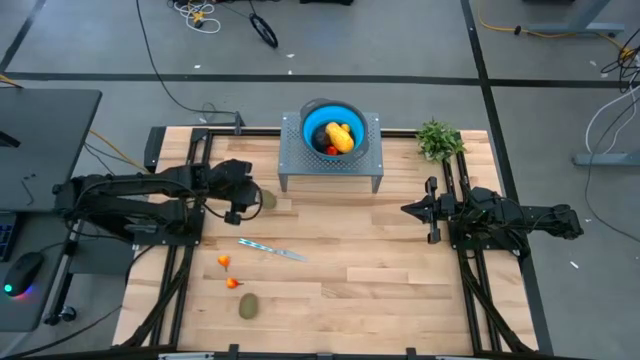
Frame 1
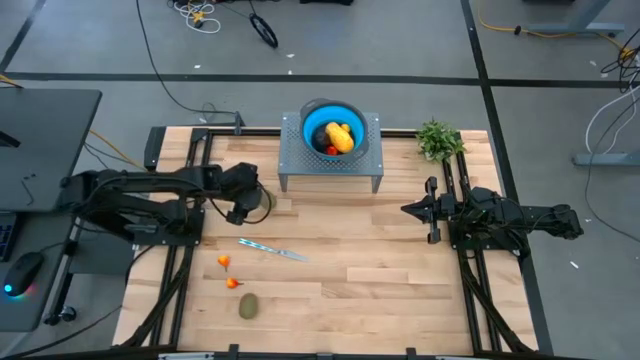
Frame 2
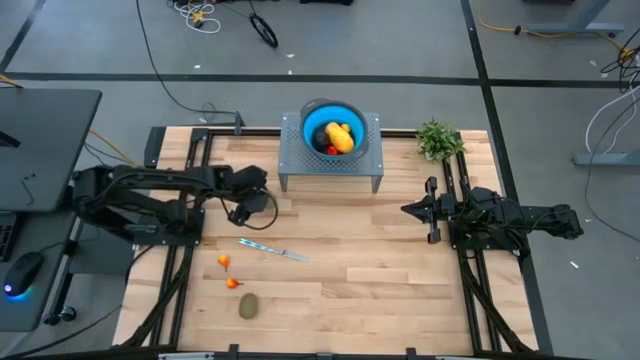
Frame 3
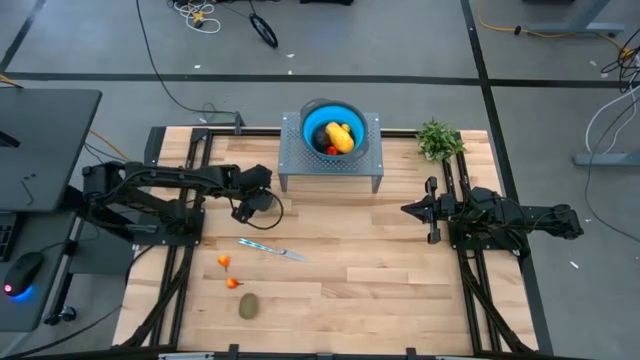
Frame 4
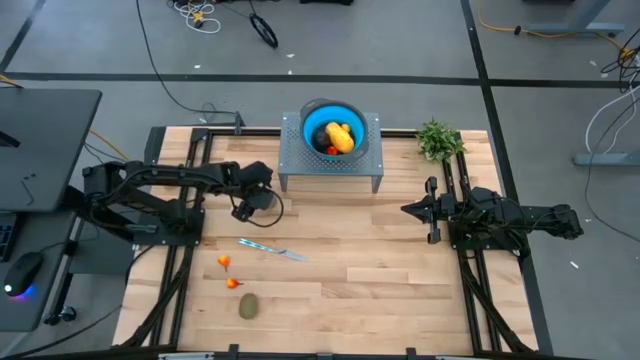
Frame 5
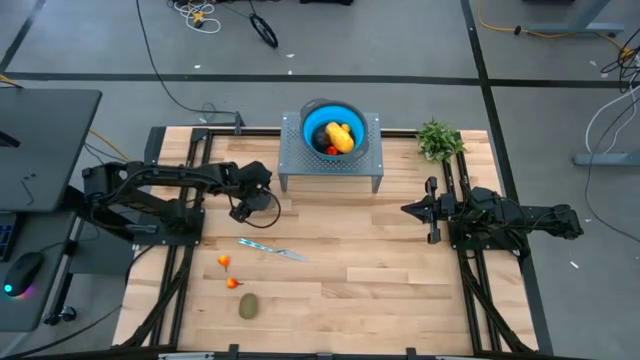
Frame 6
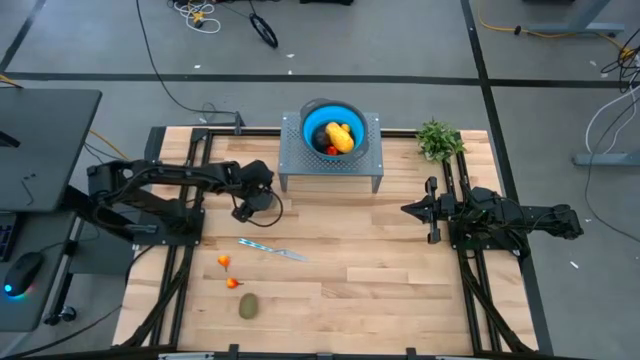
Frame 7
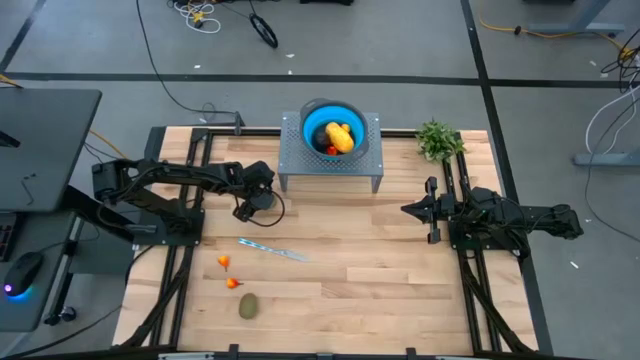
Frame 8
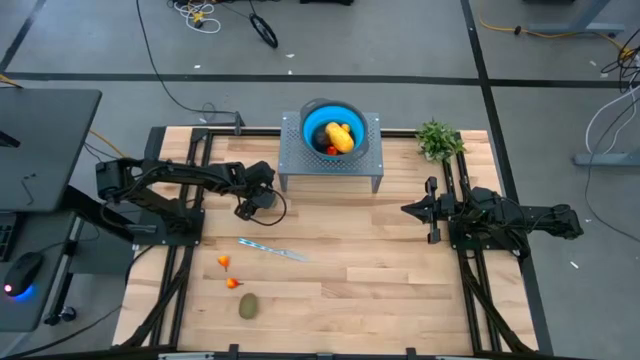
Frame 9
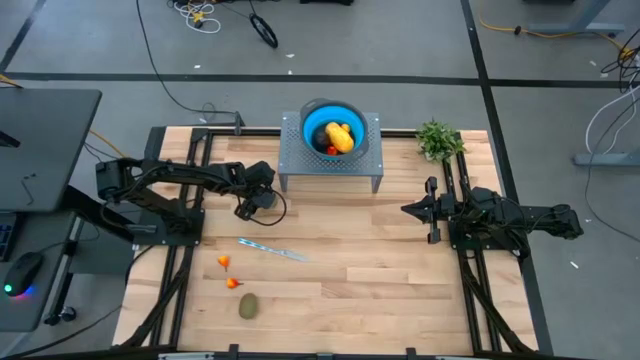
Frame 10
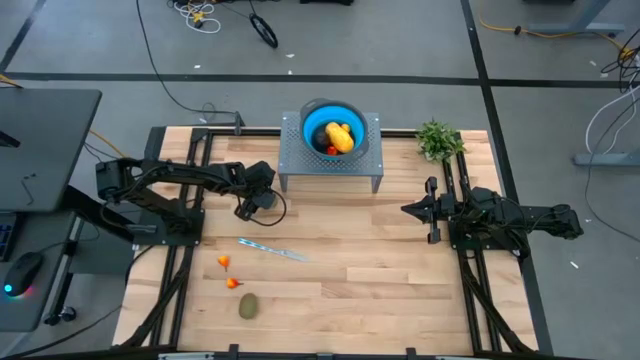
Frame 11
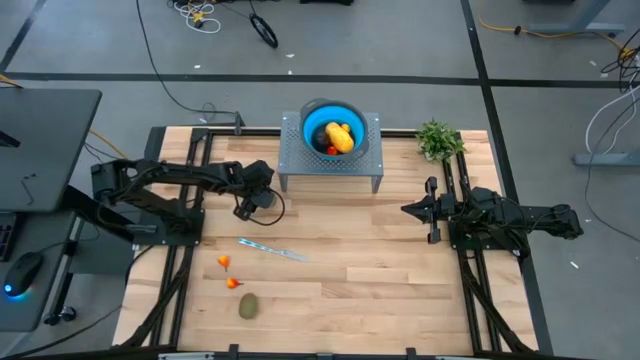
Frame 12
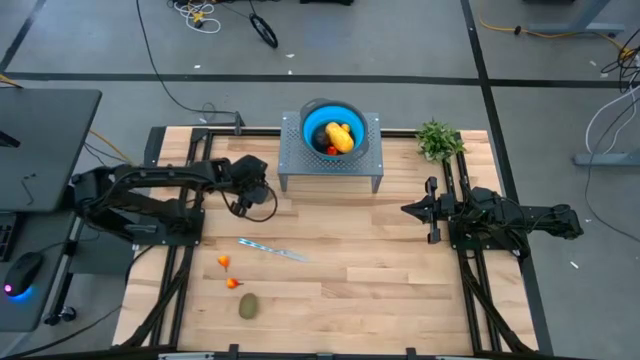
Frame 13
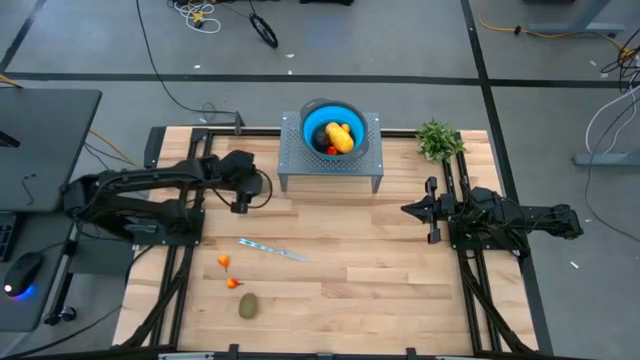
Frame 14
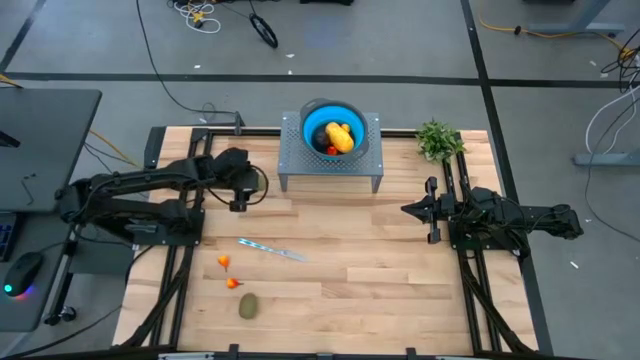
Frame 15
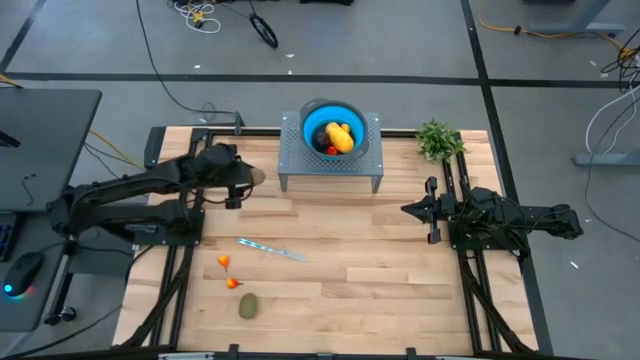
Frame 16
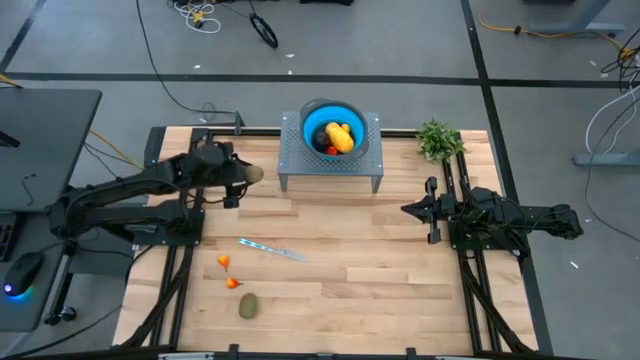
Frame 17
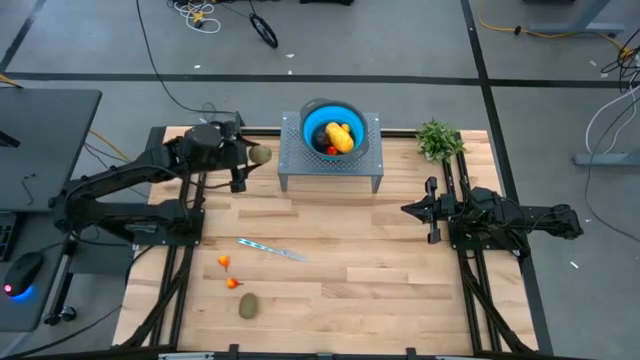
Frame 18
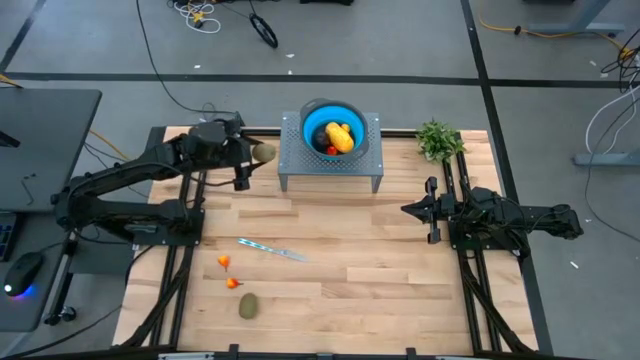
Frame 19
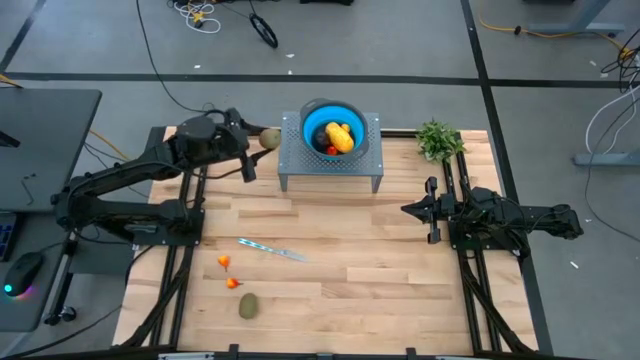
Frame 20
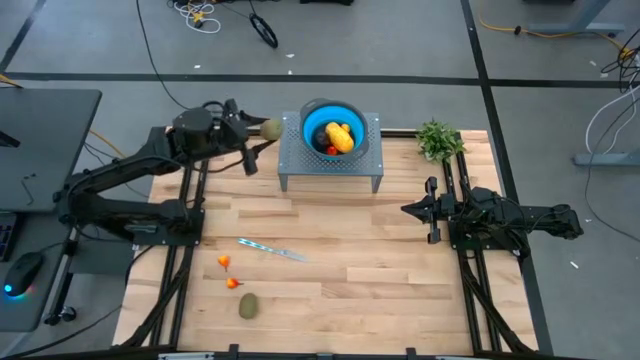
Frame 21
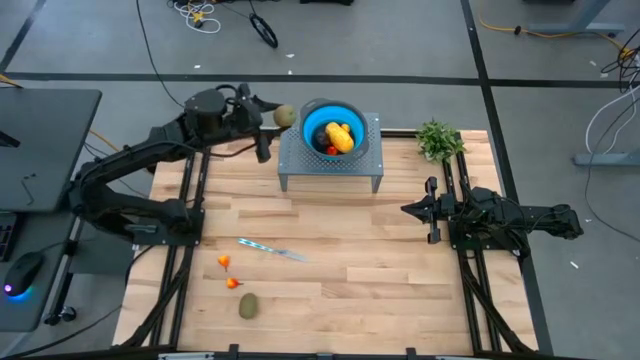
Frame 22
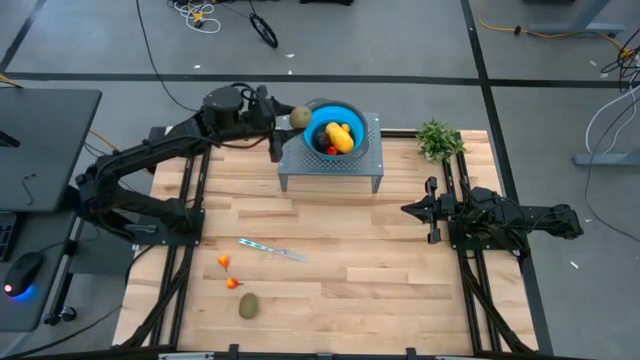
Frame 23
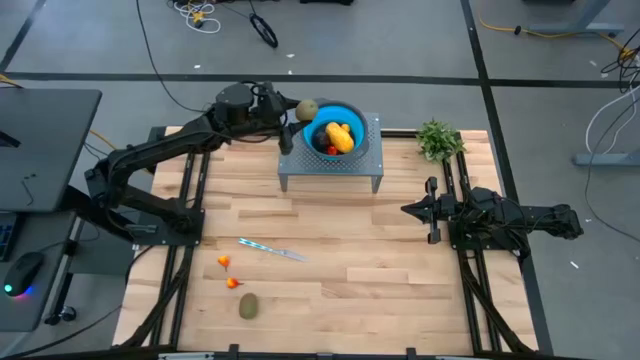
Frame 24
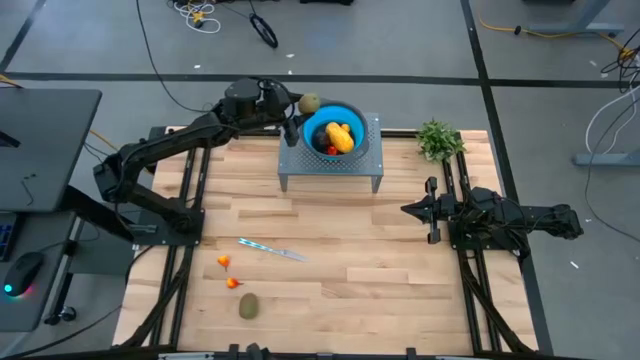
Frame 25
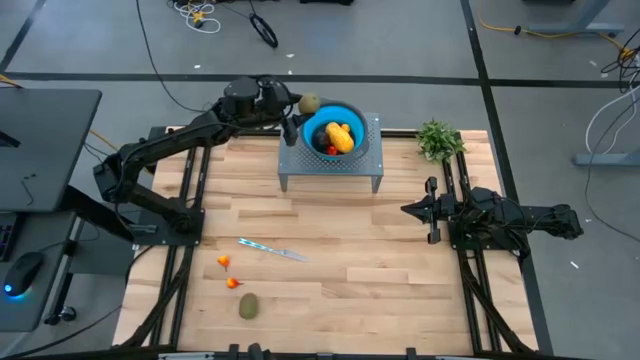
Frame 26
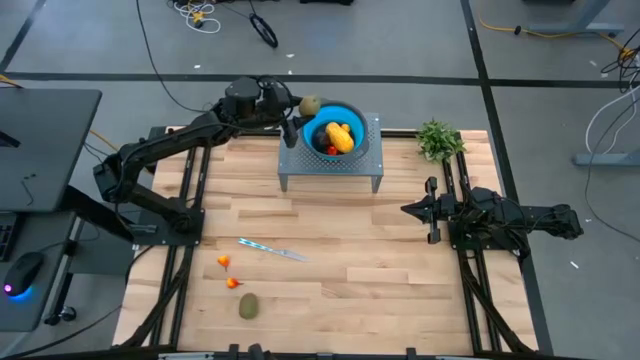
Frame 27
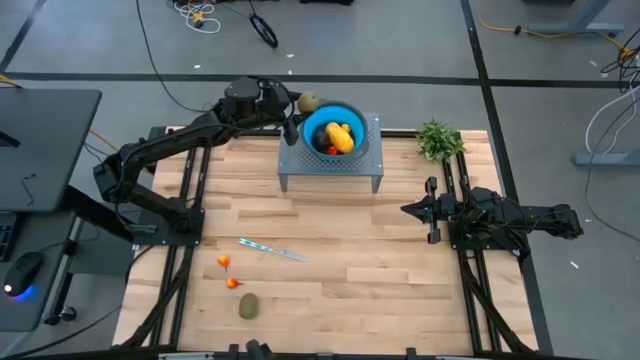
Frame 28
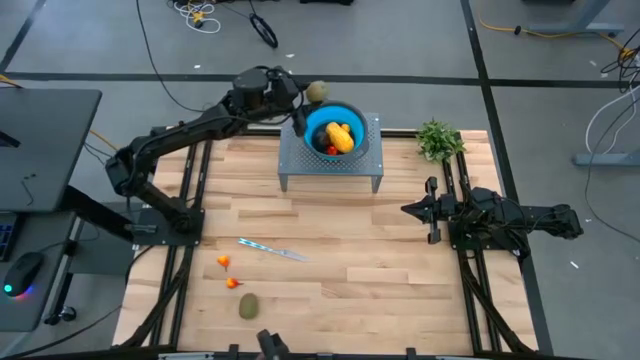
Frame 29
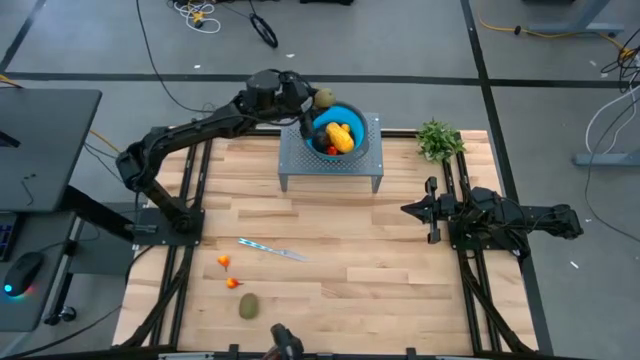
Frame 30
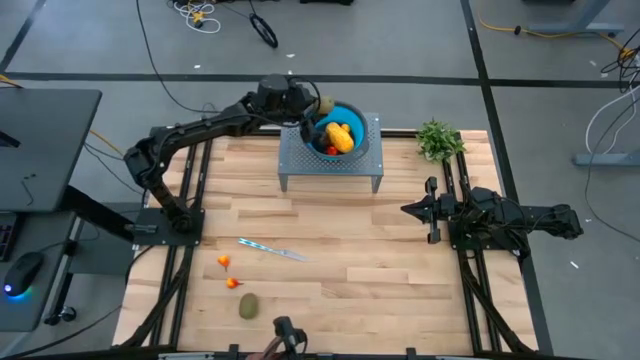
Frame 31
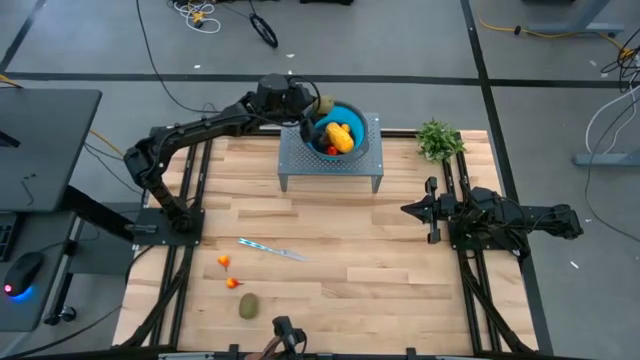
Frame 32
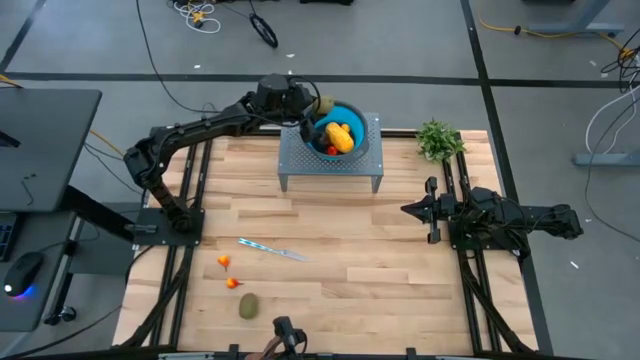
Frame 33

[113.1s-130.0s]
Task: Pick & Place Fruit
Put the top kiwi into the blue bin

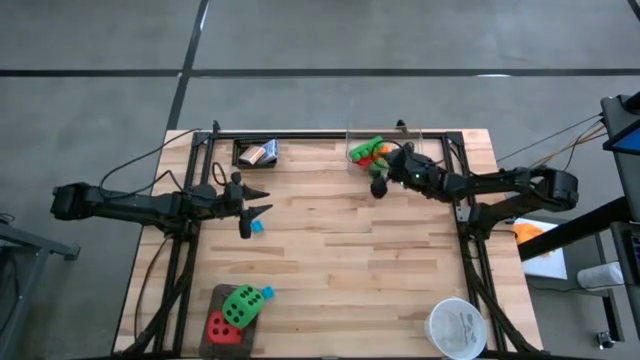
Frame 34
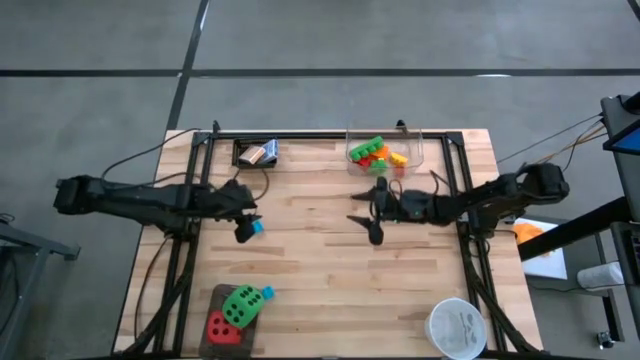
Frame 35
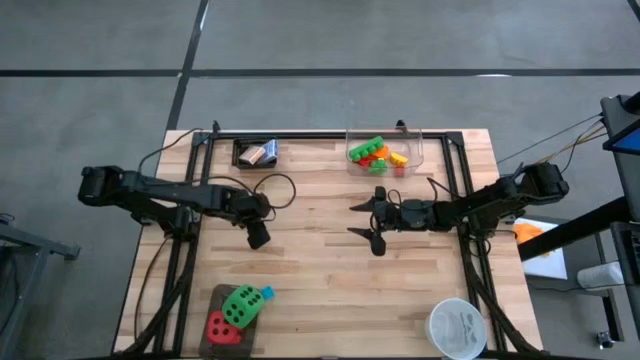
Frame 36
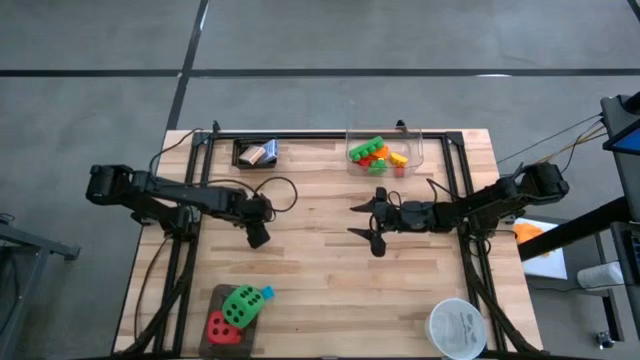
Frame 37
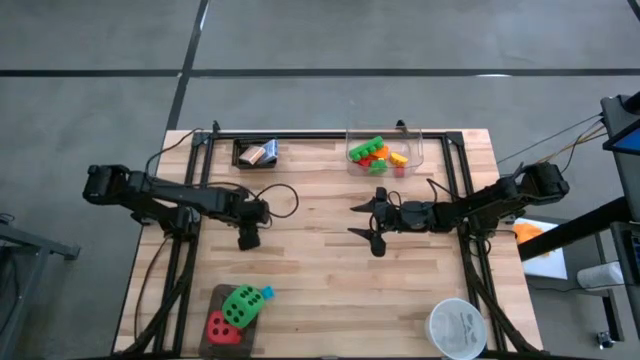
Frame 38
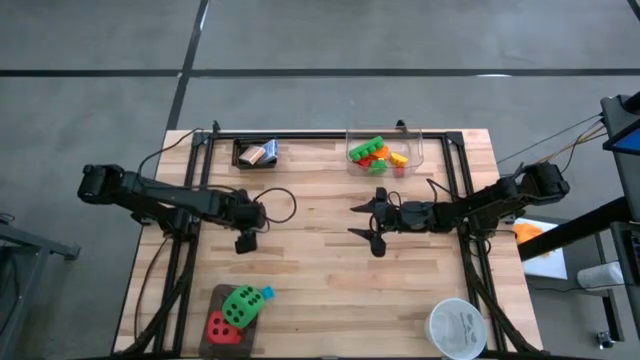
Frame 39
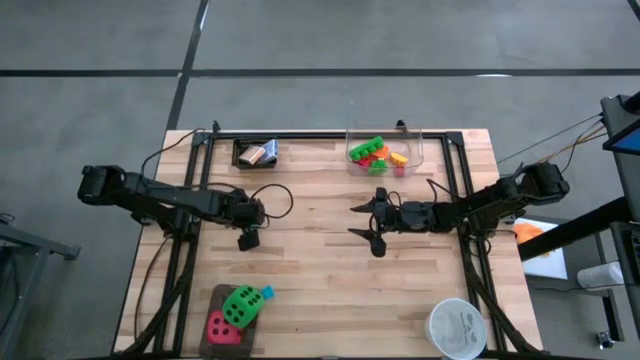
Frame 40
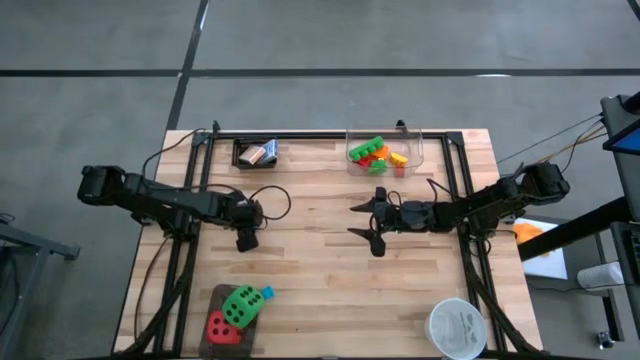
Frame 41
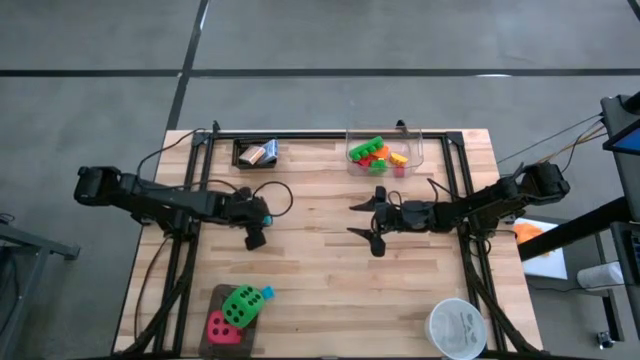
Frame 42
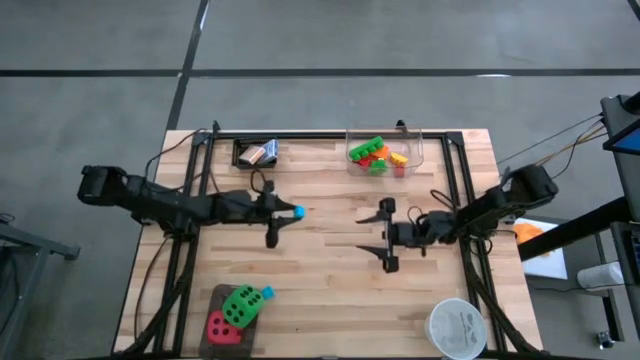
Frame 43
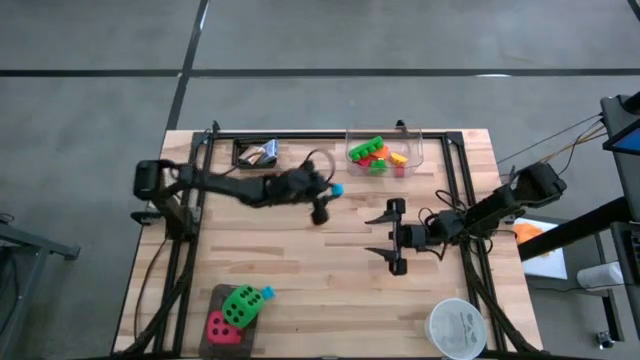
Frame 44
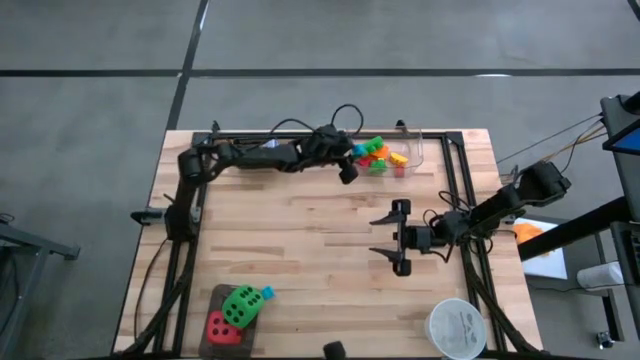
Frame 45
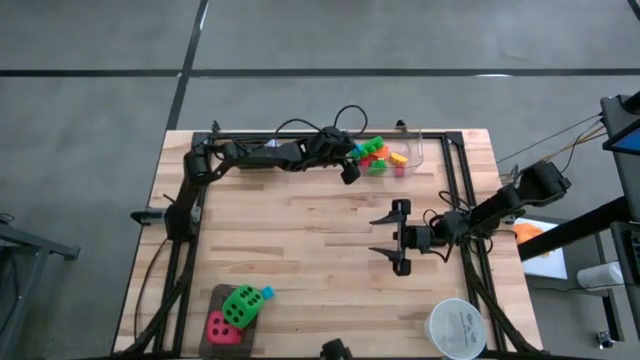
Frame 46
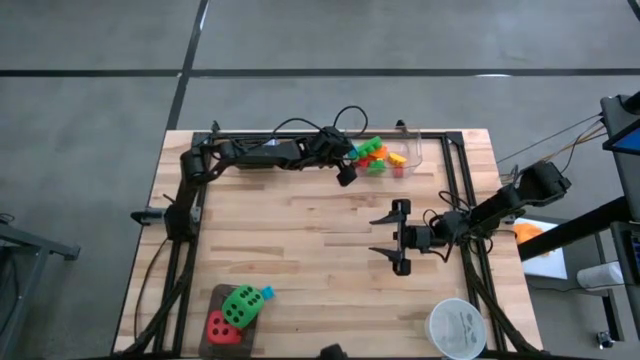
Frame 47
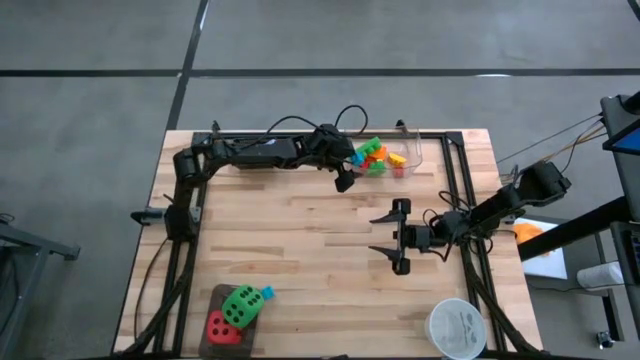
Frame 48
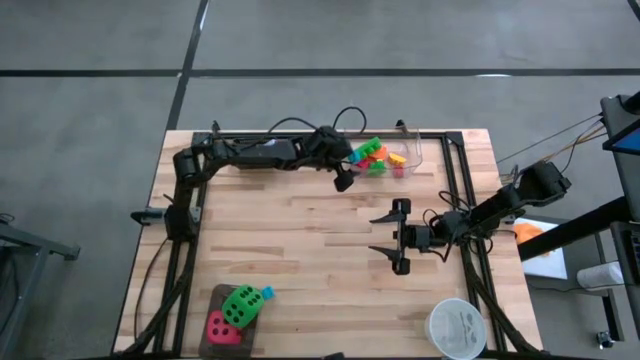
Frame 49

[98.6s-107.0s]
Task: Pick & Place Toys
Put the top blue game piece into the transparent bin
